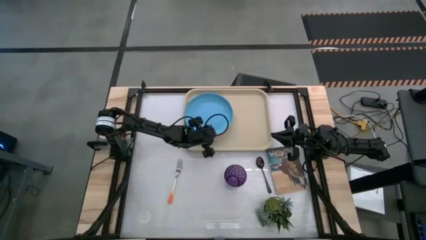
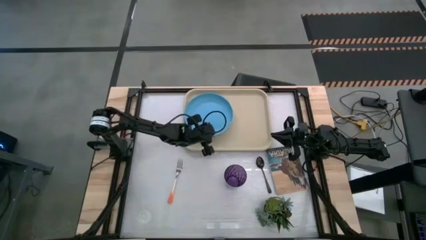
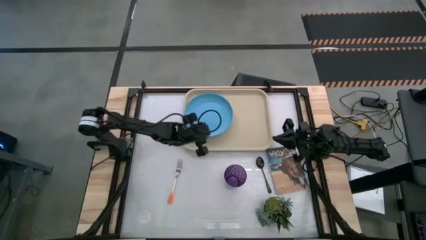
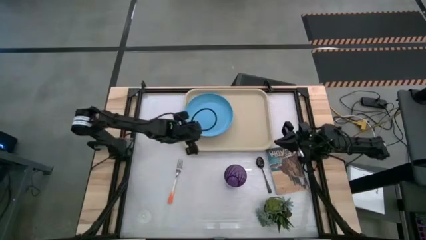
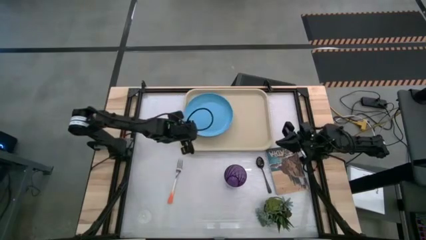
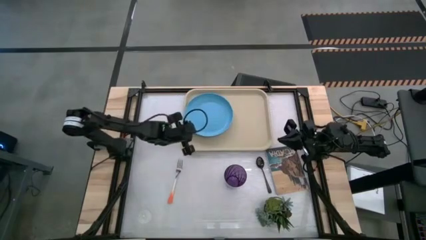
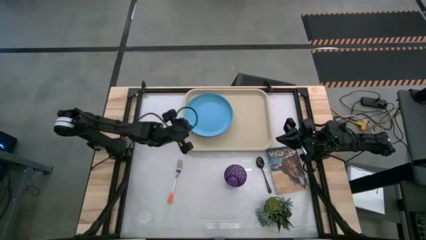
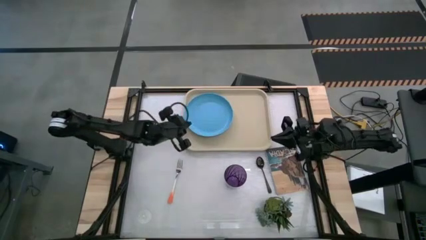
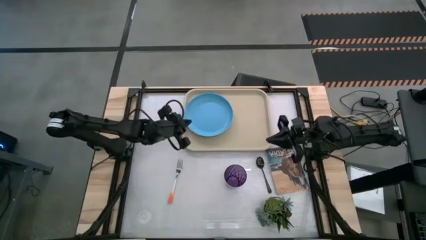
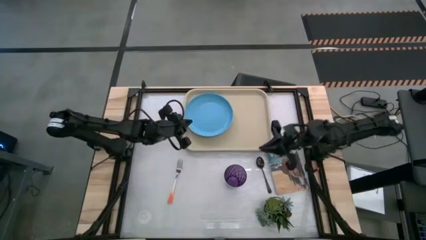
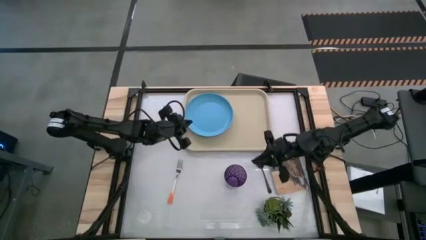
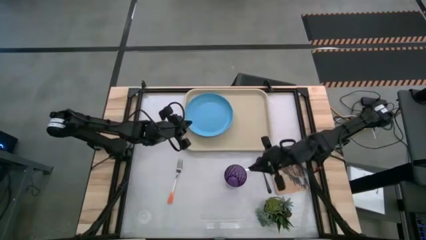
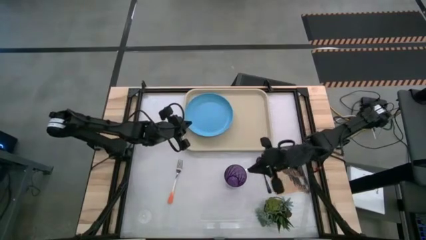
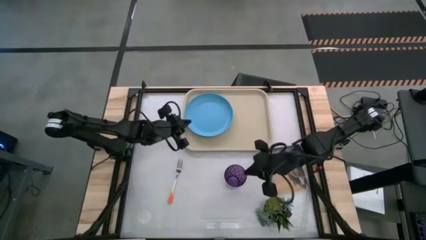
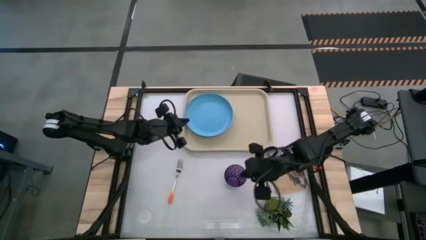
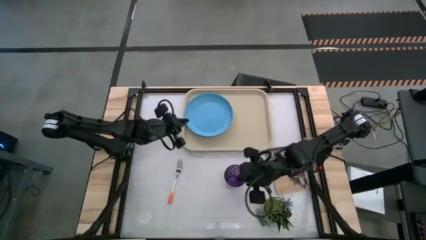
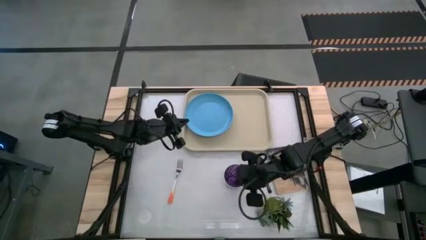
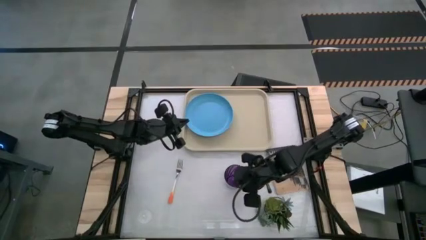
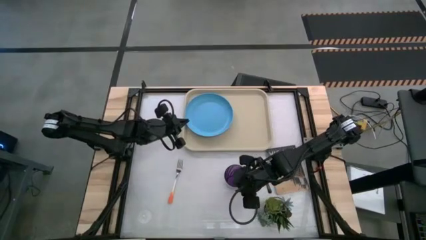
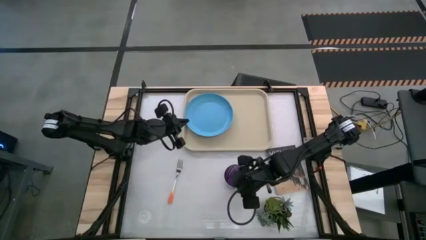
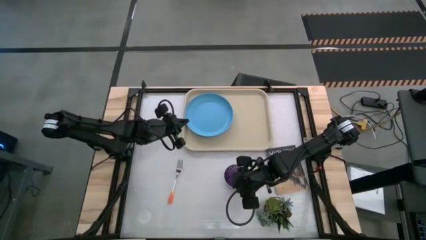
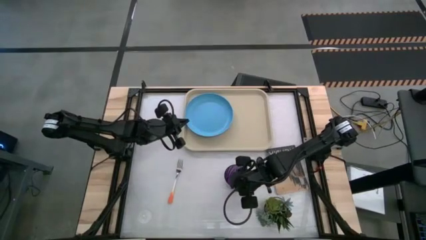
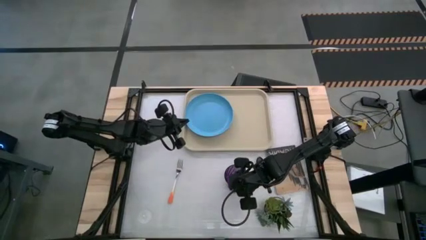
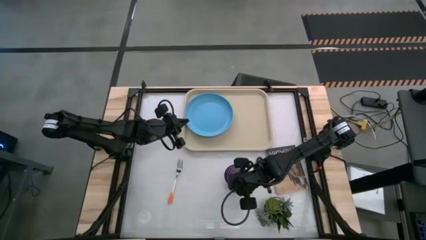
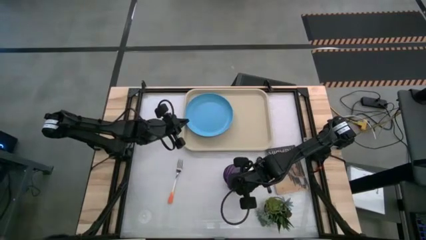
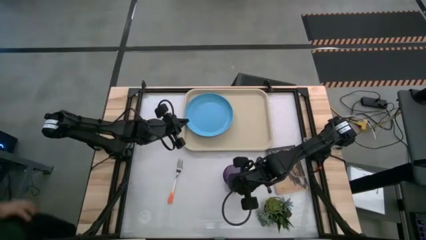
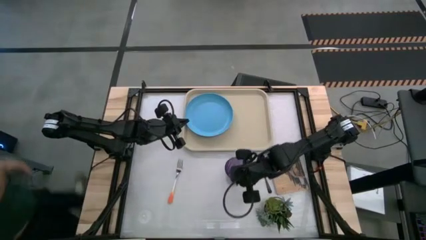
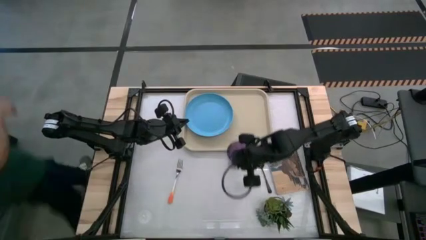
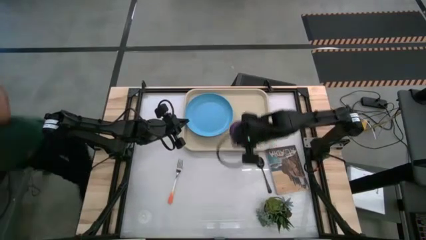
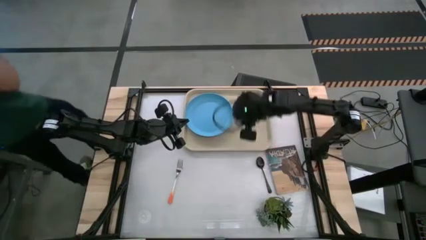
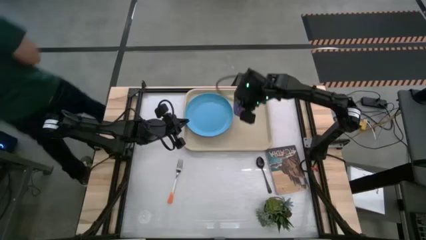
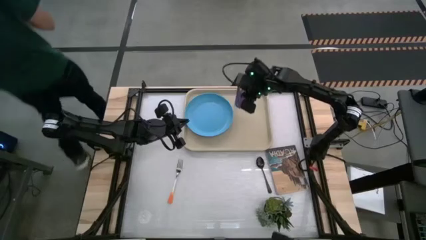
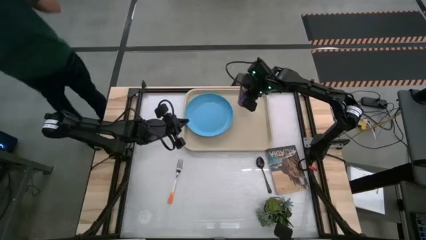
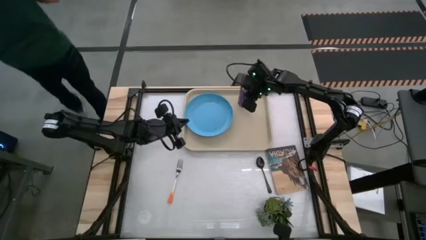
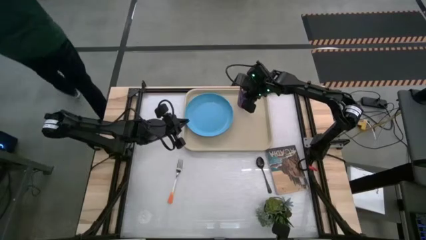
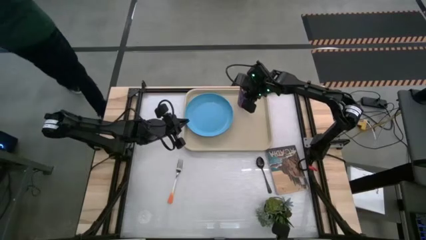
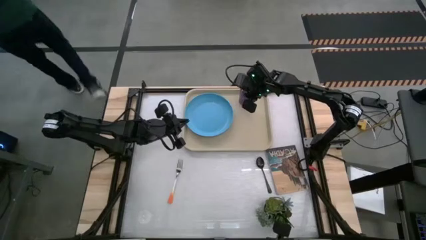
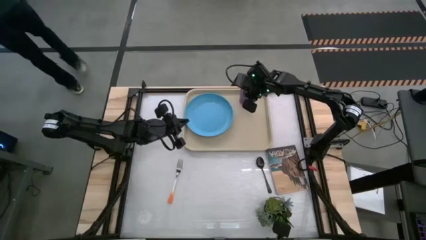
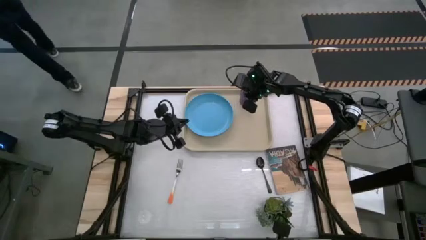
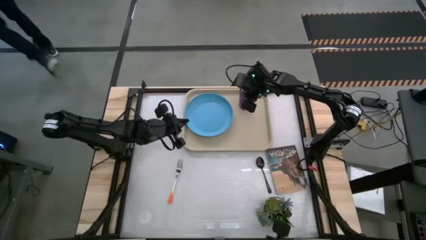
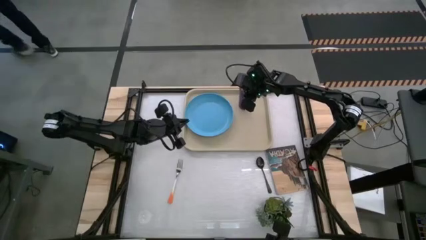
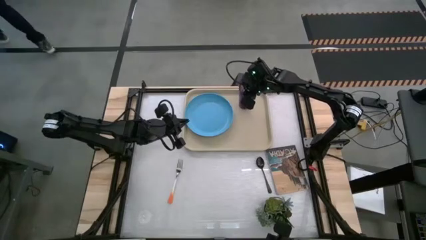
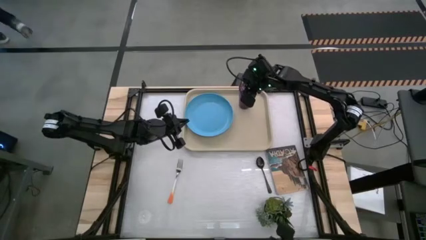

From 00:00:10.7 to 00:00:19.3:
Task: Pick and place plate/cup/fork/spoon on tray
Put the purple cup on the top right of the tray

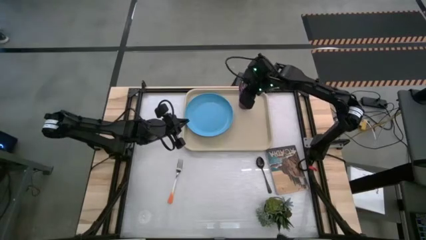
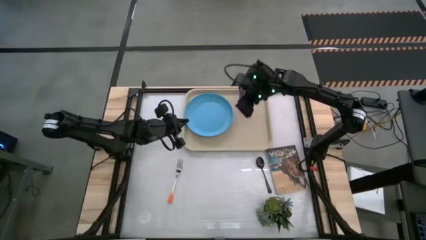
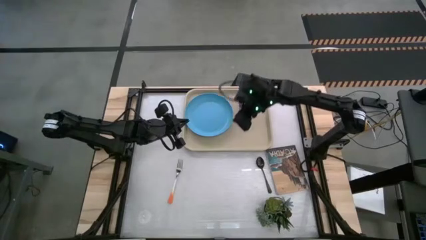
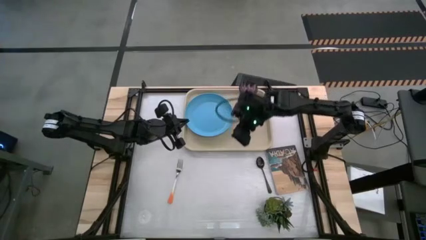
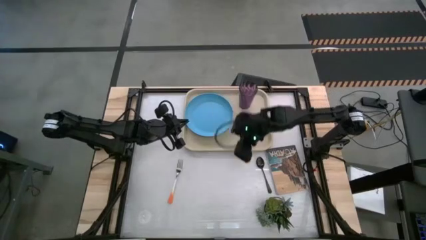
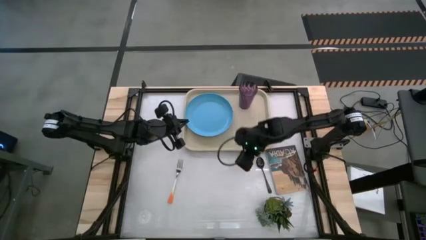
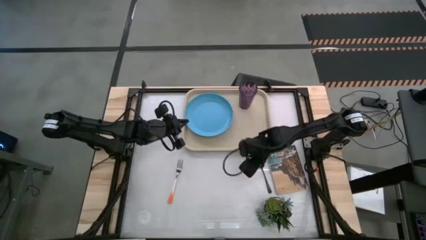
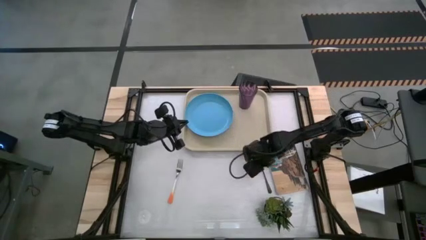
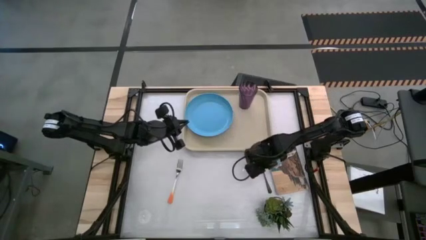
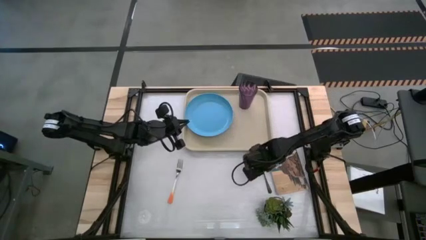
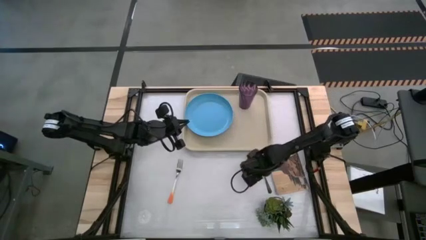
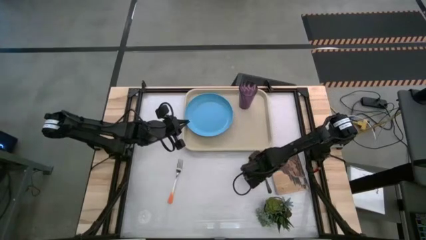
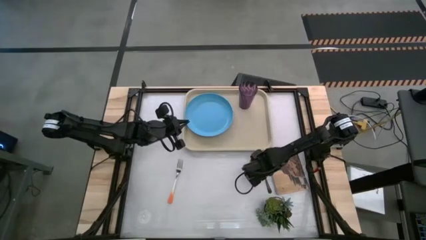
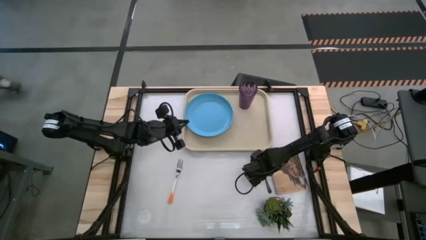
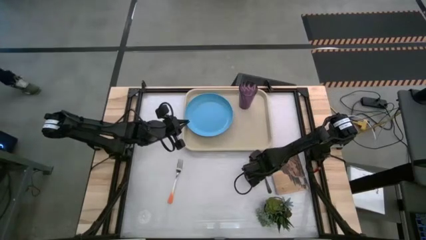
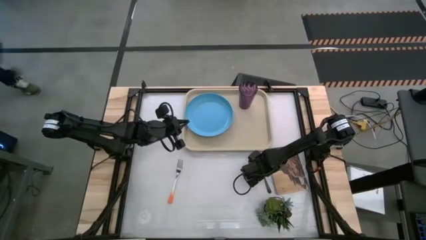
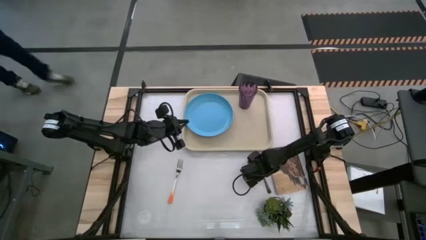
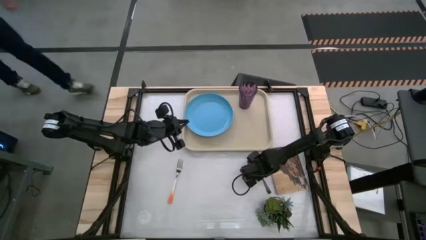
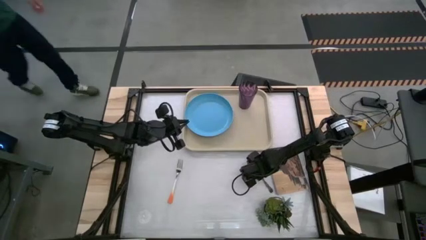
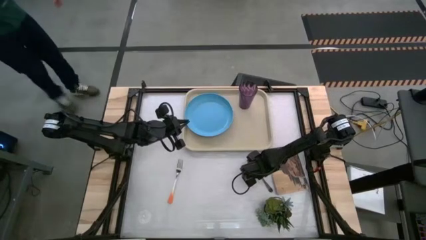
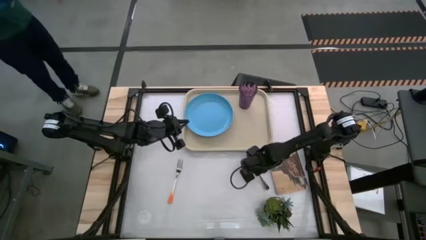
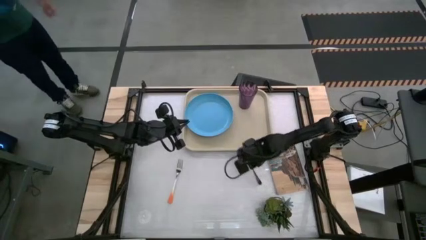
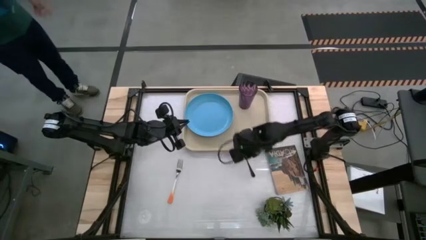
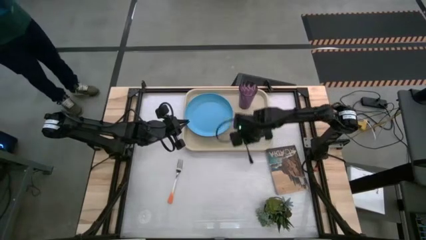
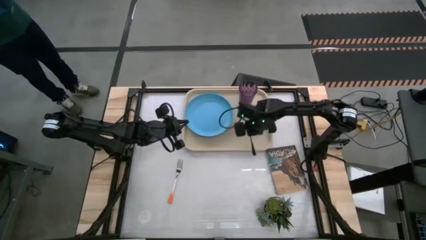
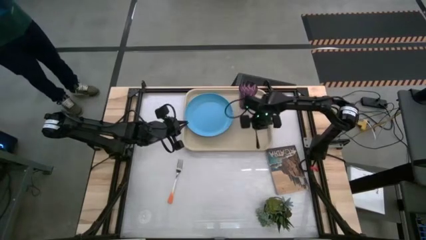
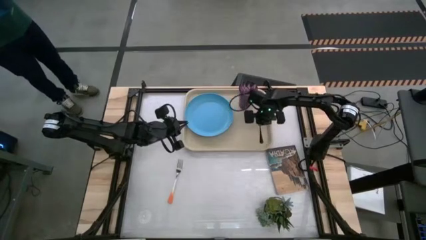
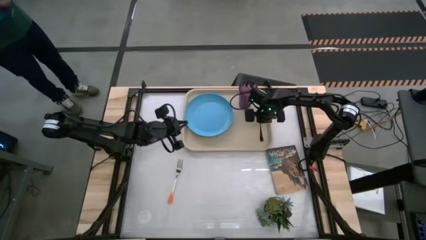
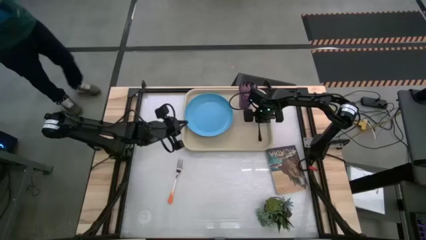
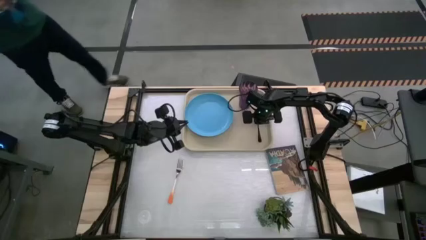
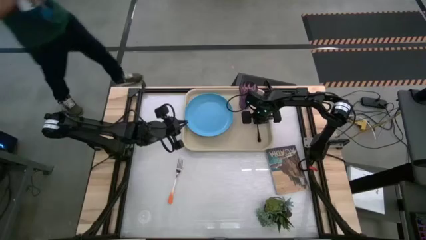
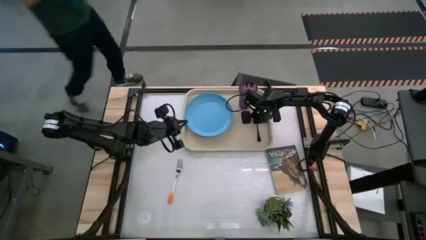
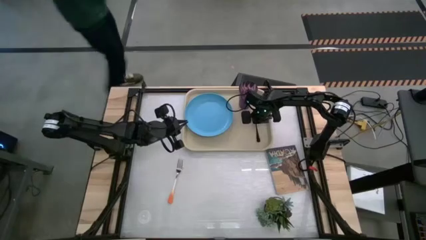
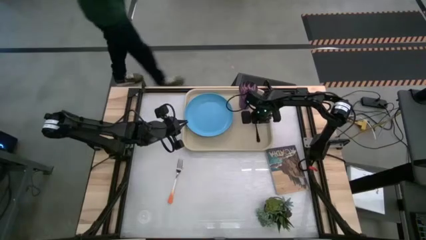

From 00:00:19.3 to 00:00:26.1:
Put the black spoon on the right of the tray

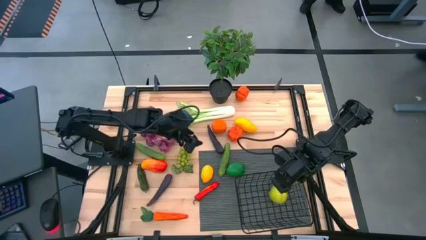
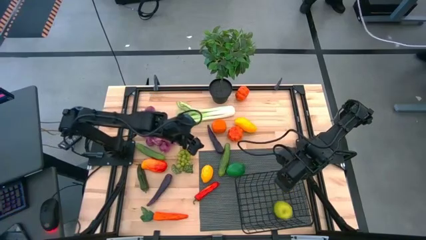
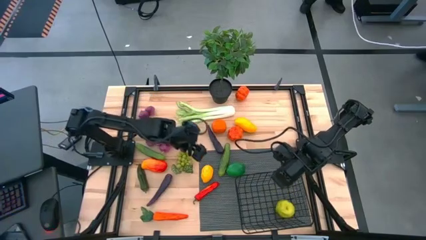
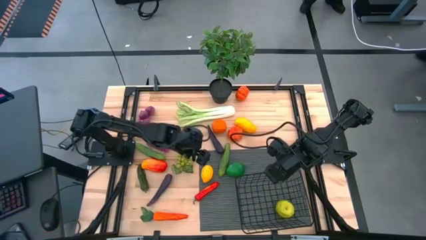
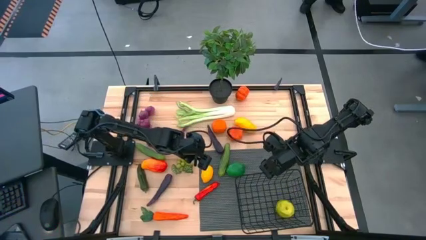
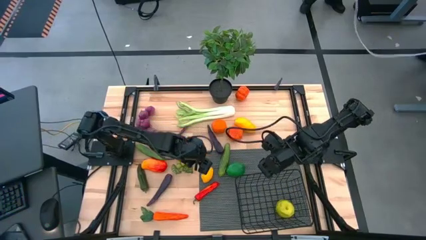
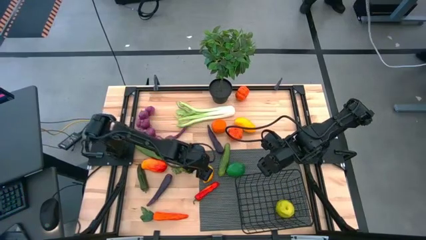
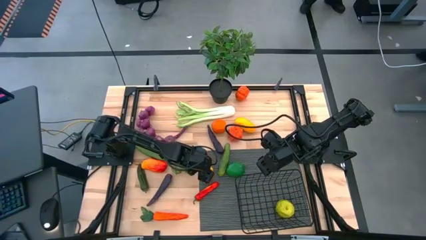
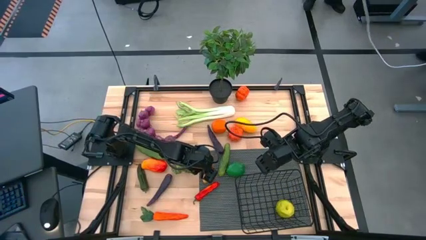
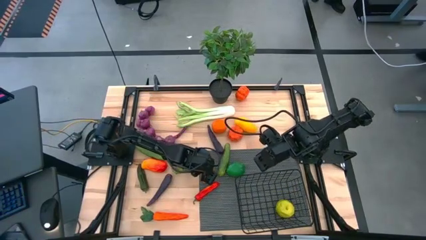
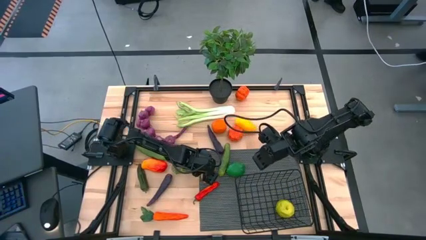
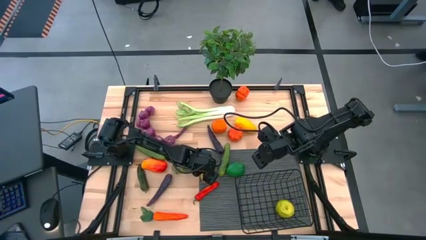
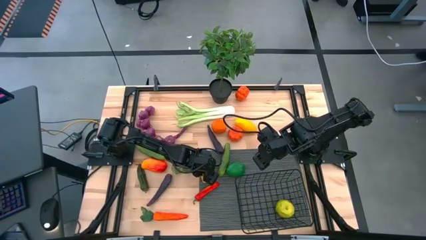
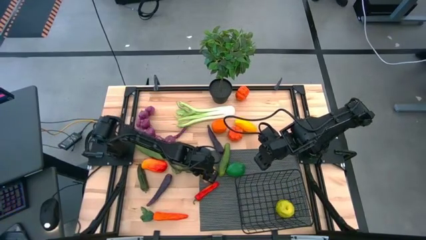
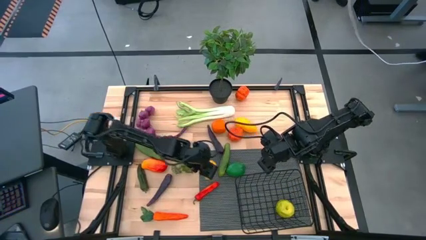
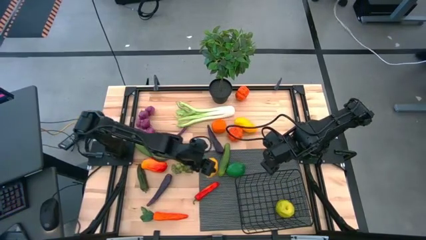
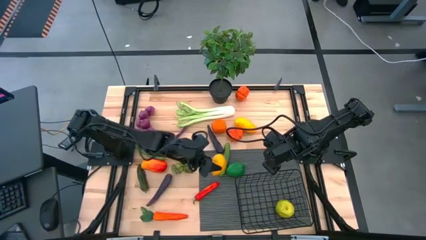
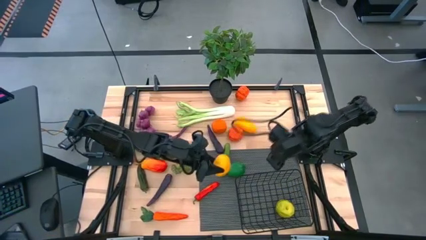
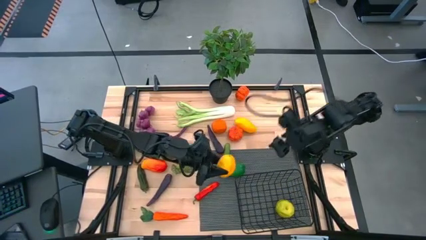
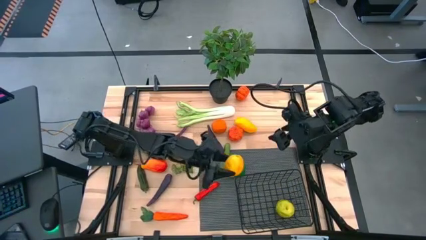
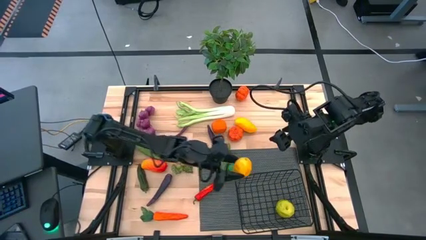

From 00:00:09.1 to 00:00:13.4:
Task: Build produce basket
Put the yellow lemon into the black wire basket
